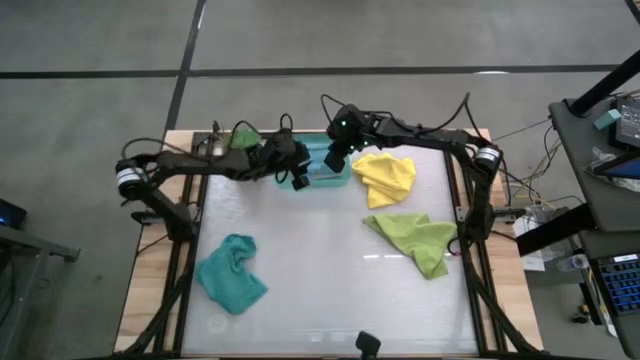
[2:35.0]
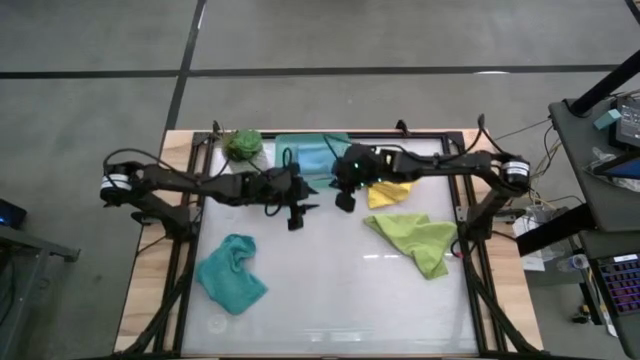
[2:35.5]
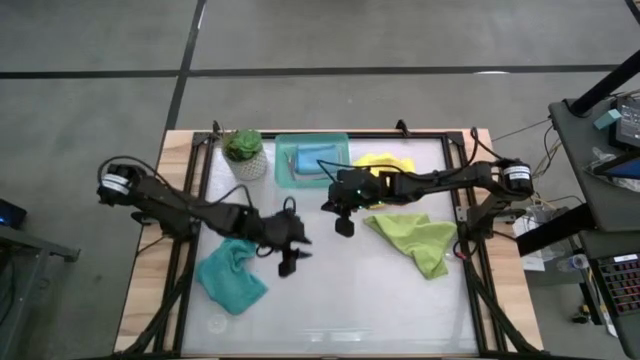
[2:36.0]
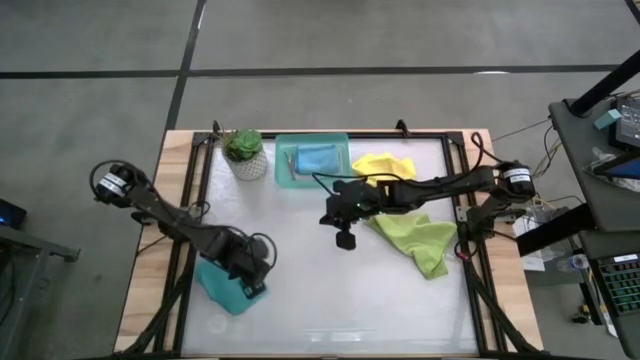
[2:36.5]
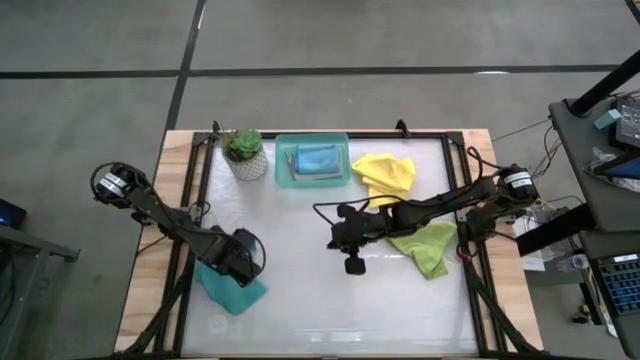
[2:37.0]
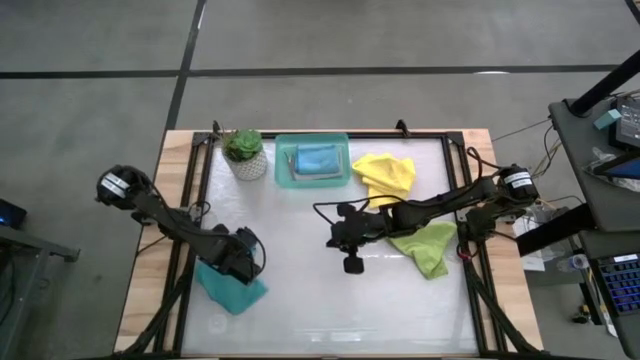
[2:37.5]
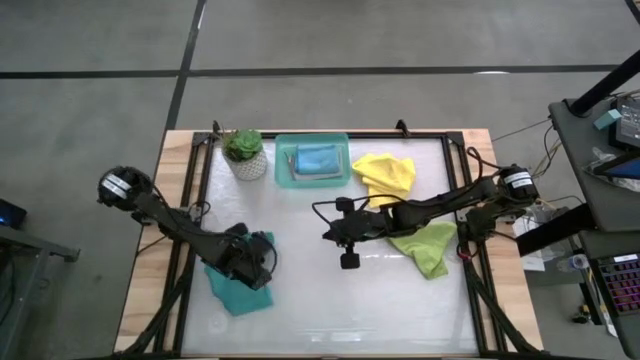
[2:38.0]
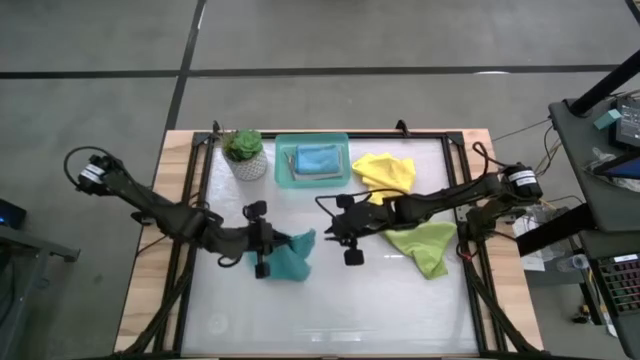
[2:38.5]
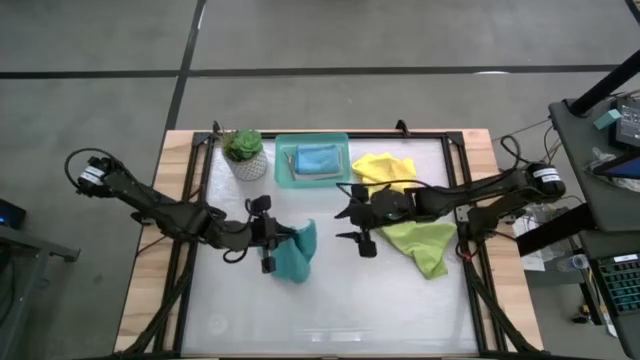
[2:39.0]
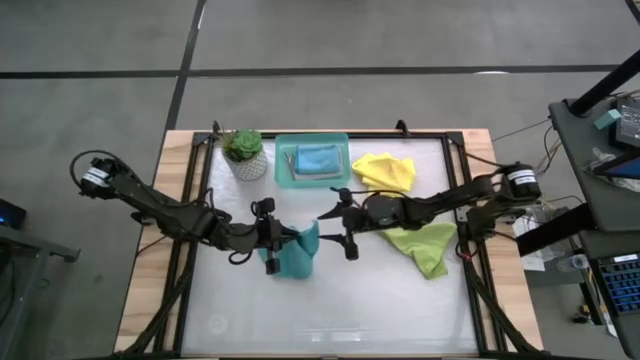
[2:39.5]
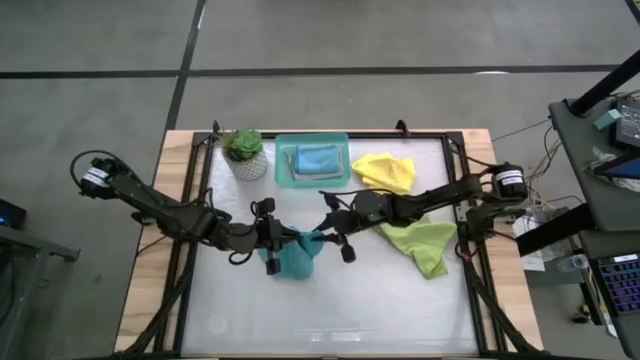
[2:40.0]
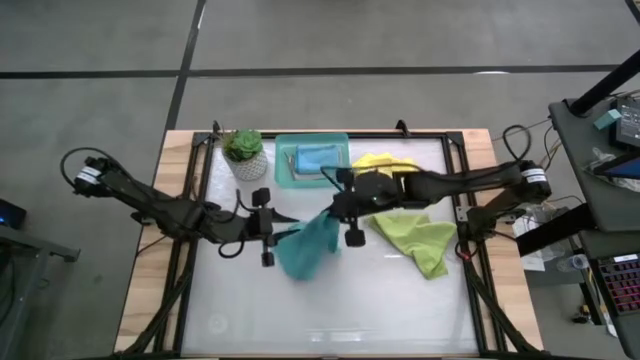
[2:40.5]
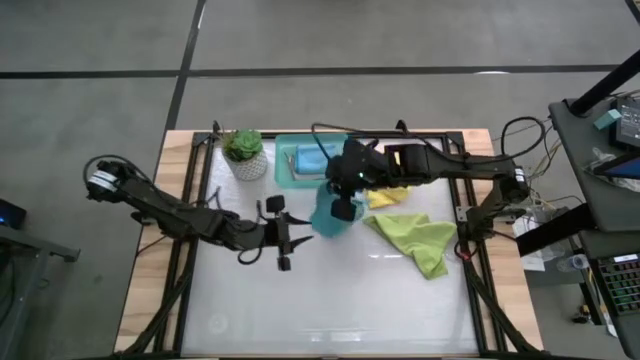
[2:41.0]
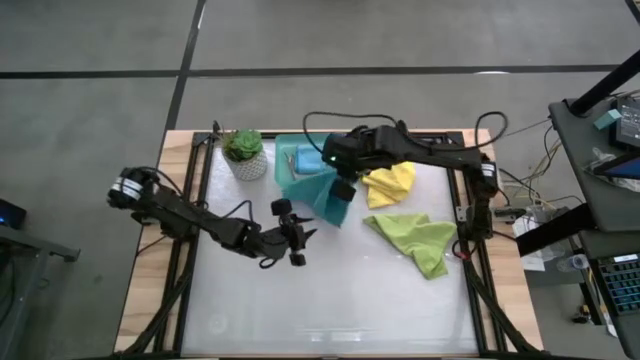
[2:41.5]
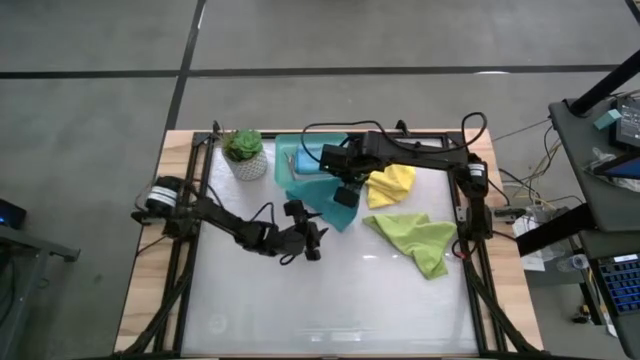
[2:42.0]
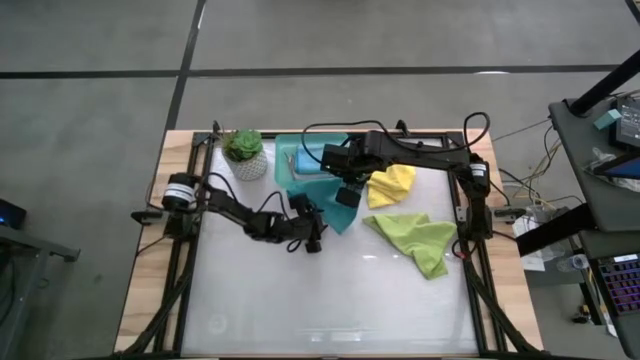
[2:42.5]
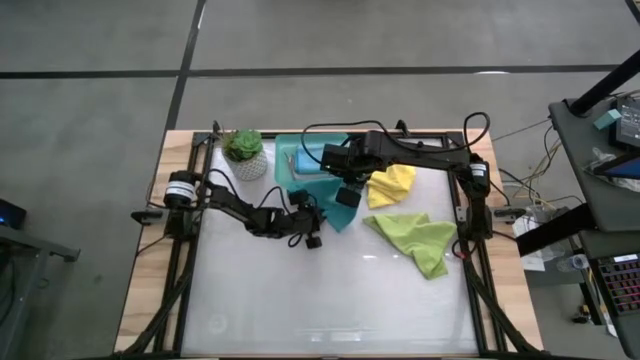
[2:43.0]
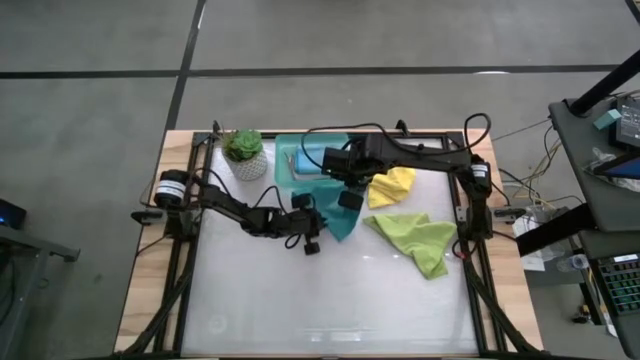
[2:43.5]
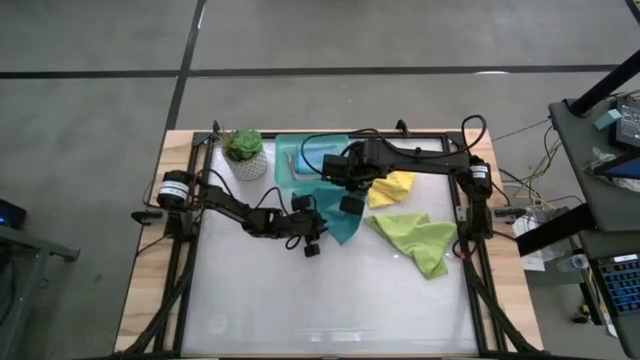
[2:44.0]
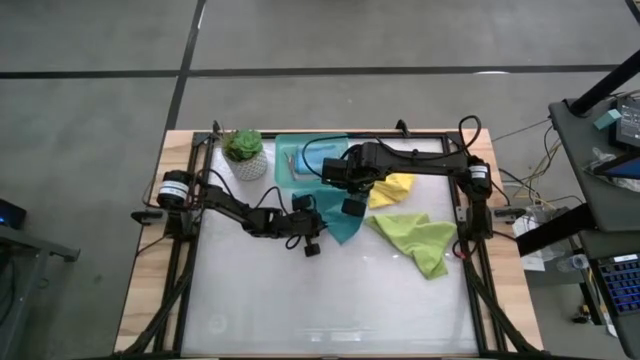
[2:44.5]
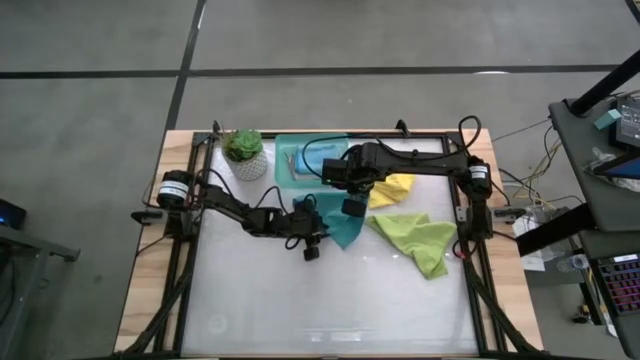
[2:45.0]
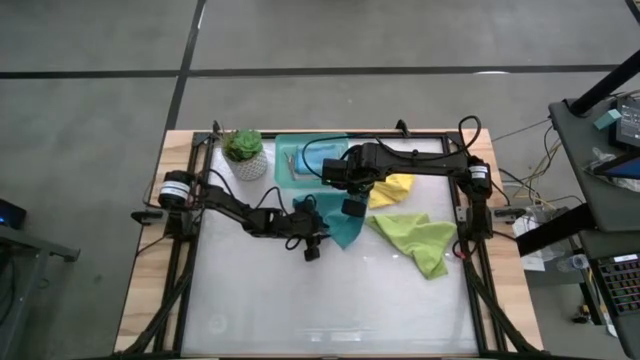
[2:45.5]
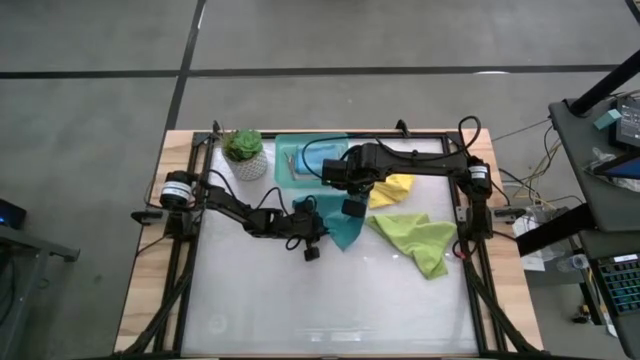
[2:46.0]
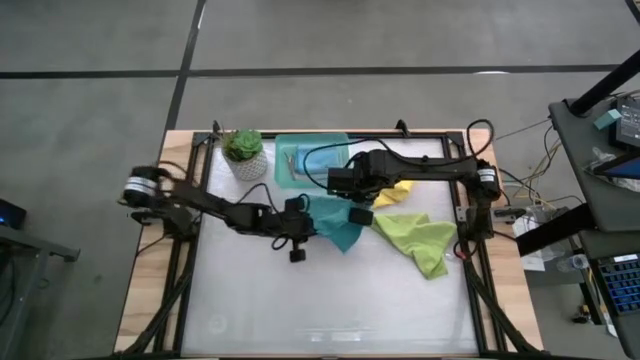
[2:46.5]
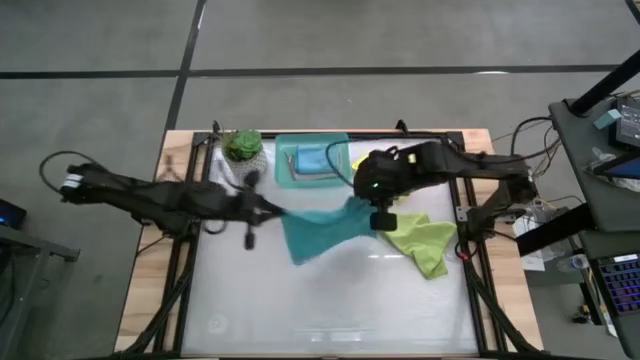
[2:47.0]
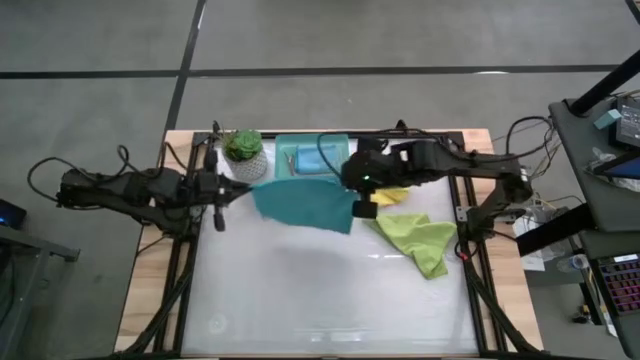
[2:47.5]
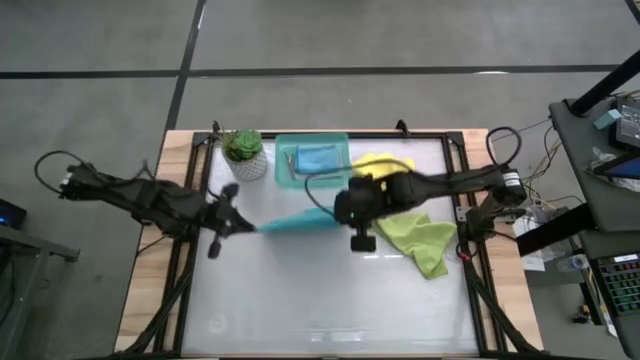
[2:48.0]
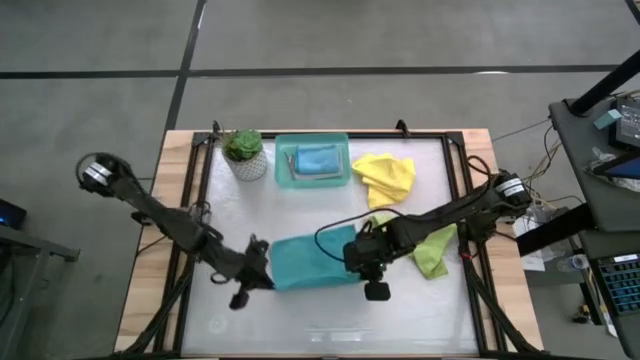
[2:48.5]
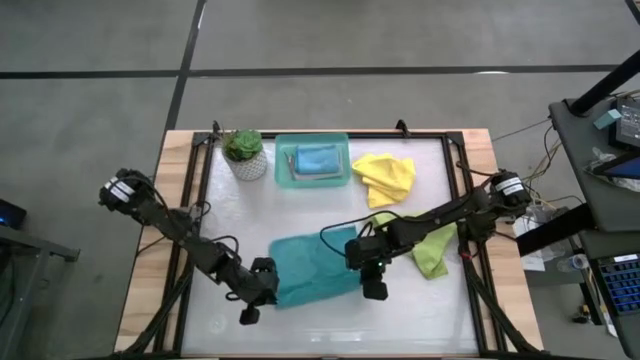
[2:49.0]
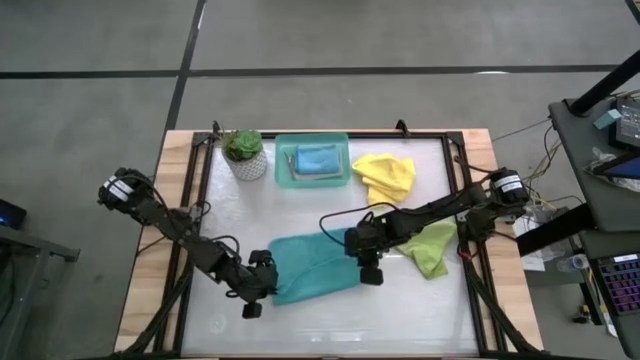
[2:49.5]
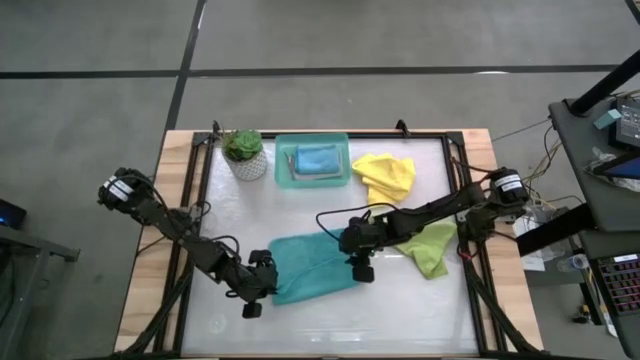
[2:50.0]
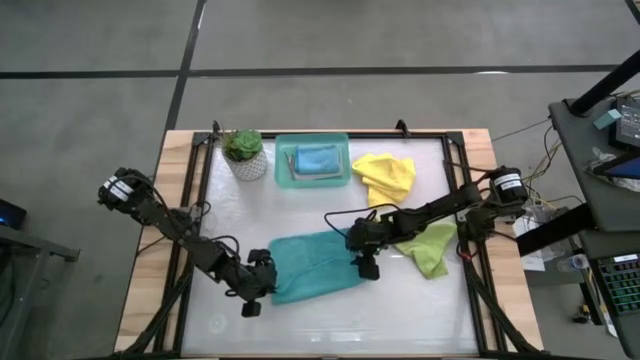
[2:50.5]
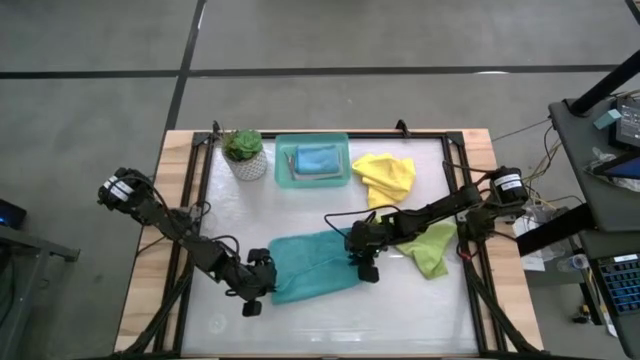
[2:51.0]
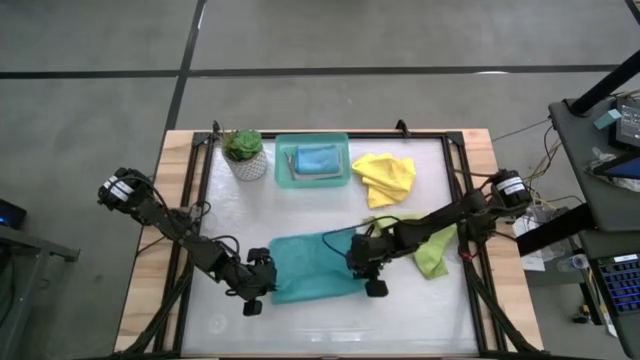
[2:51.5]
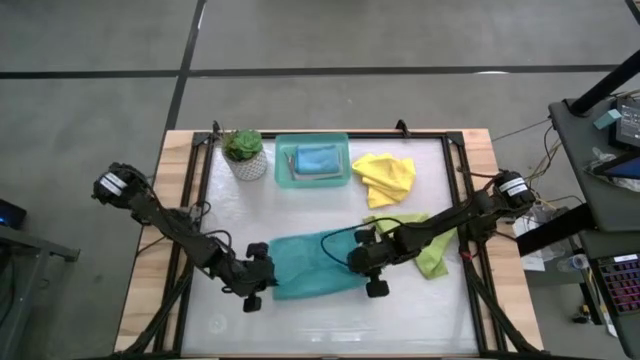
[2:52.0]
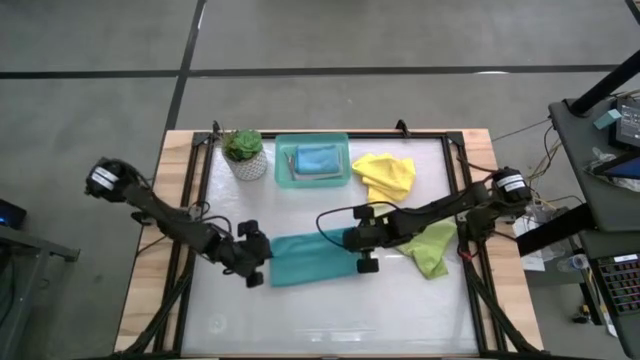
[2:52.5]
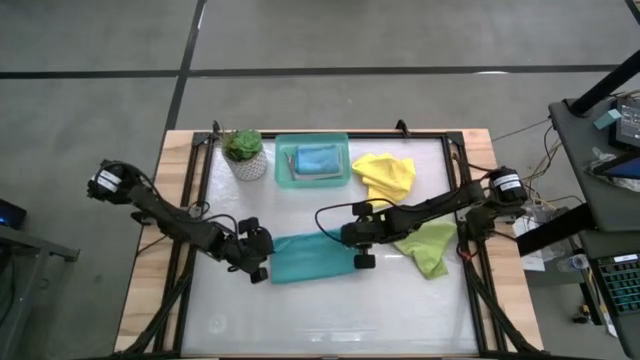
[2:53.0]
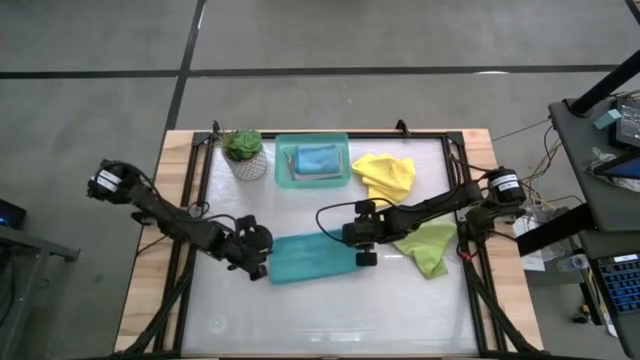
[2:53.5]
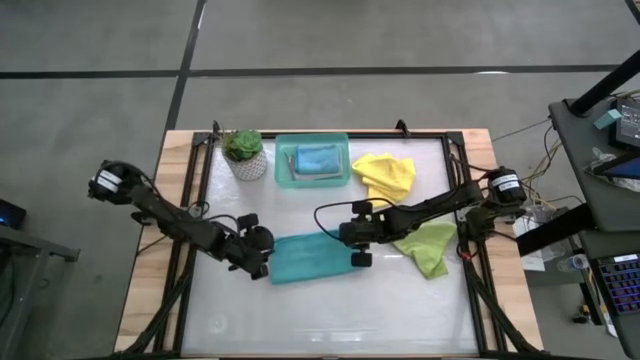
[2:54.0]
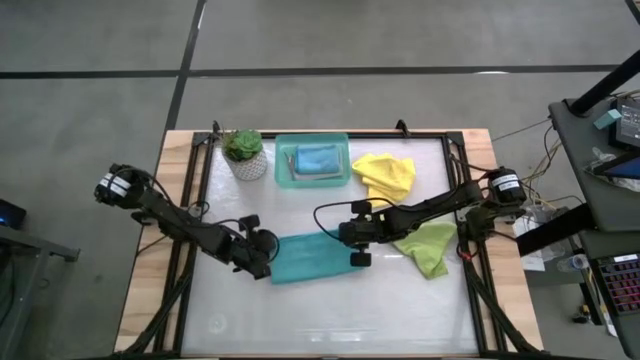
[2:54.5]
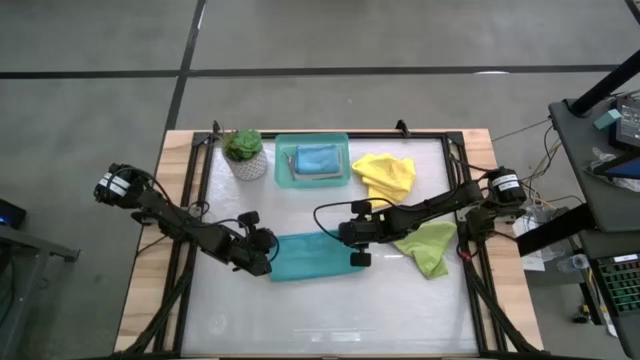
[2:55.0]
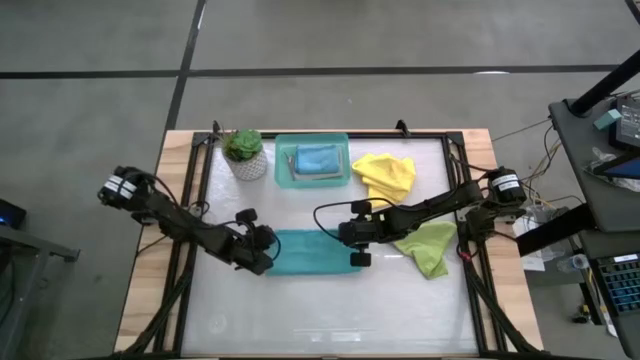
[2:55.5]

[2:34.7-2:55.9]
Task: Fold microfiber towels
Fold the light blue microfiber cloth
